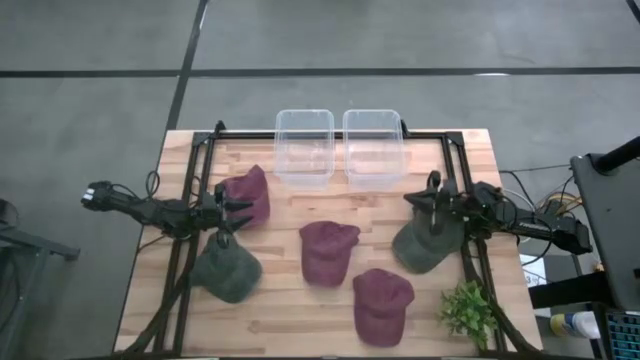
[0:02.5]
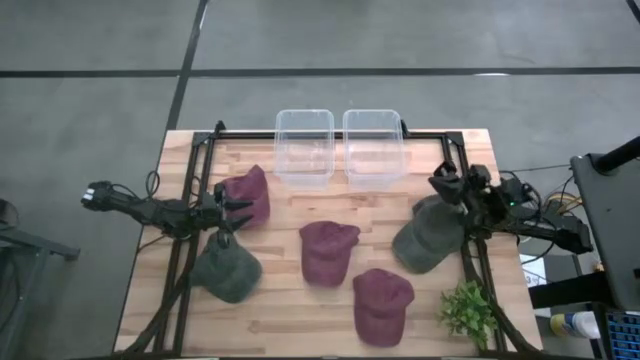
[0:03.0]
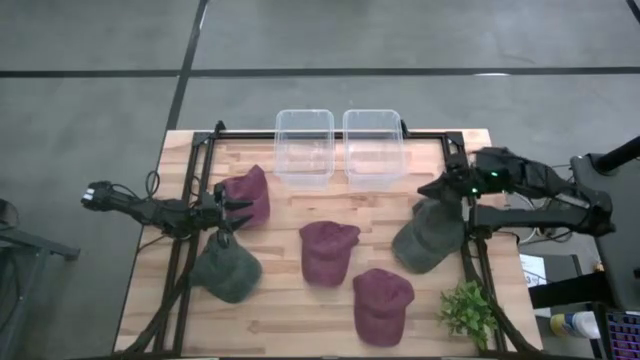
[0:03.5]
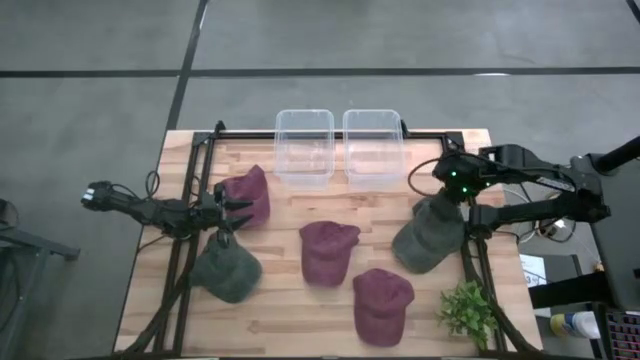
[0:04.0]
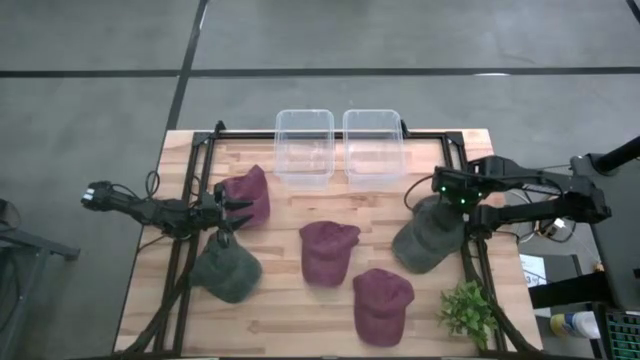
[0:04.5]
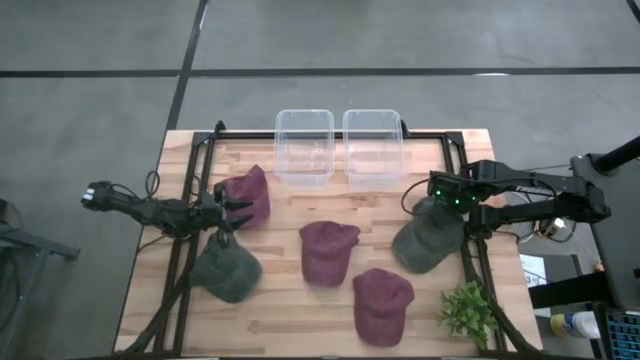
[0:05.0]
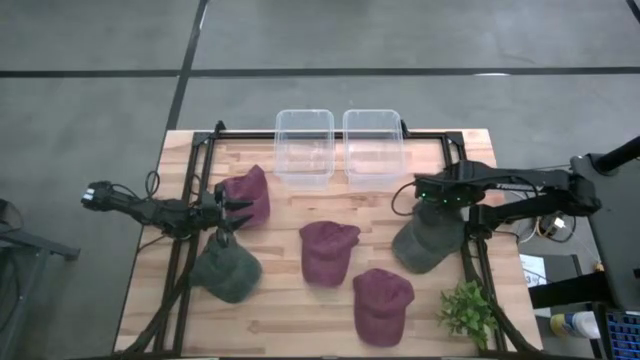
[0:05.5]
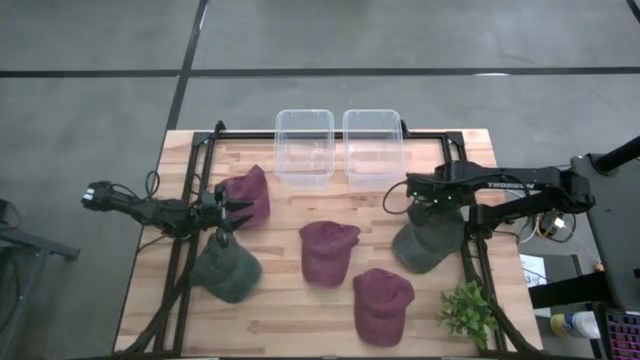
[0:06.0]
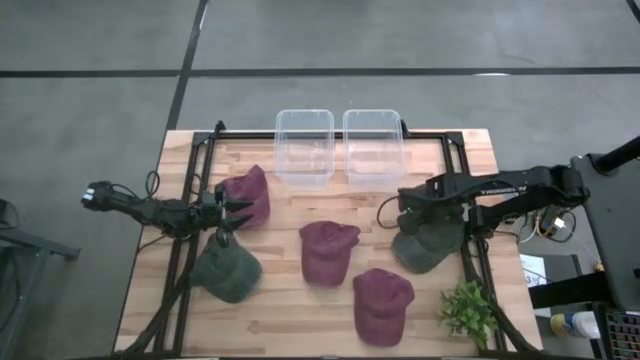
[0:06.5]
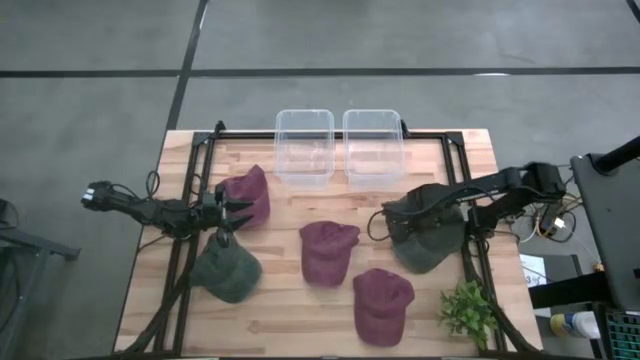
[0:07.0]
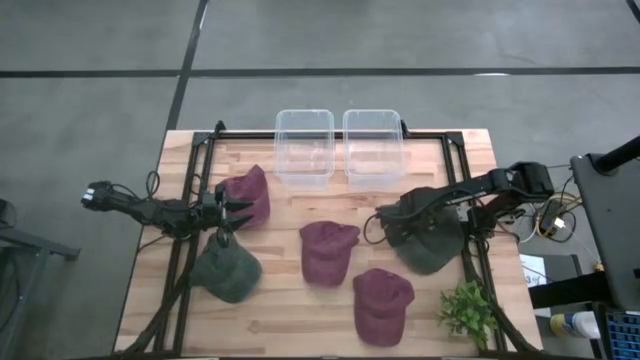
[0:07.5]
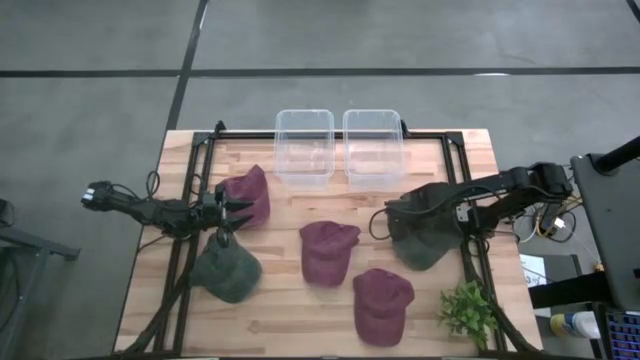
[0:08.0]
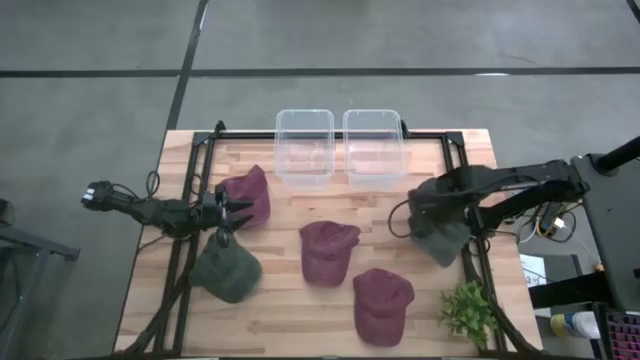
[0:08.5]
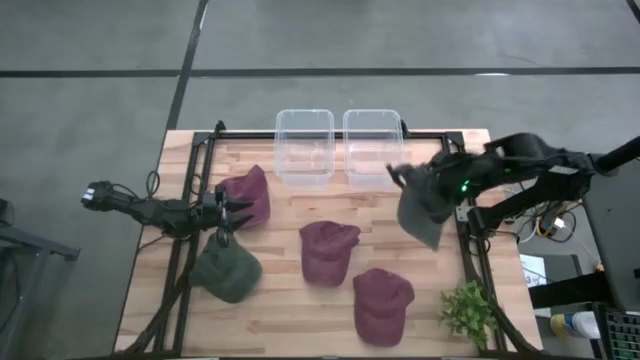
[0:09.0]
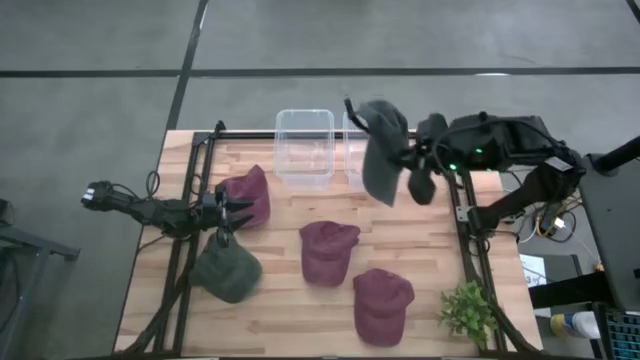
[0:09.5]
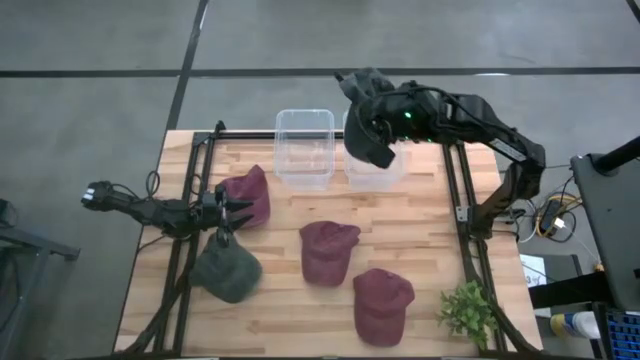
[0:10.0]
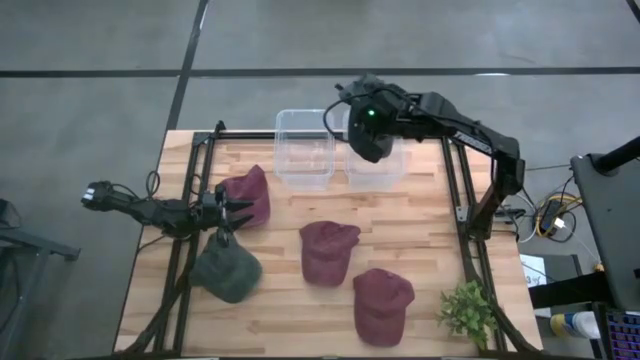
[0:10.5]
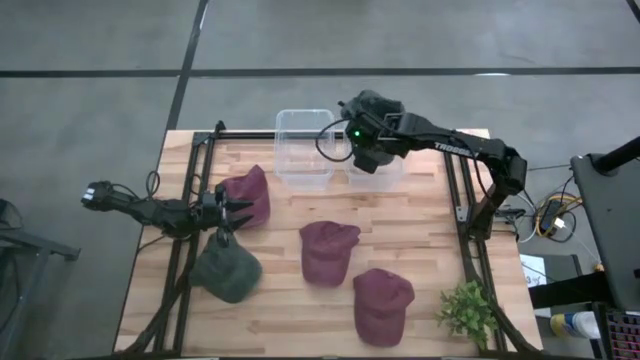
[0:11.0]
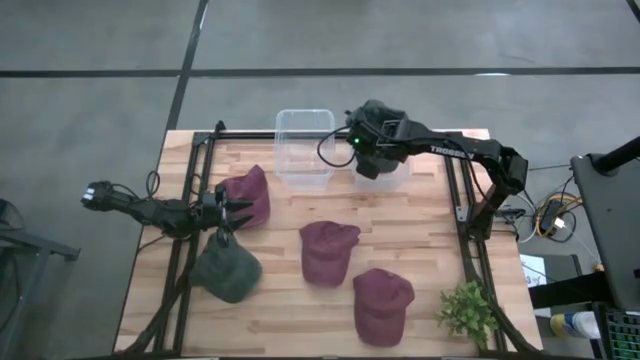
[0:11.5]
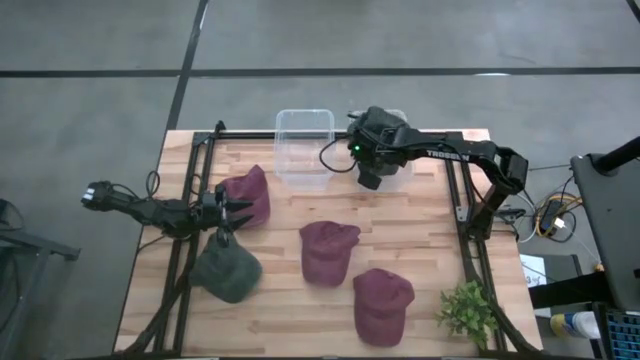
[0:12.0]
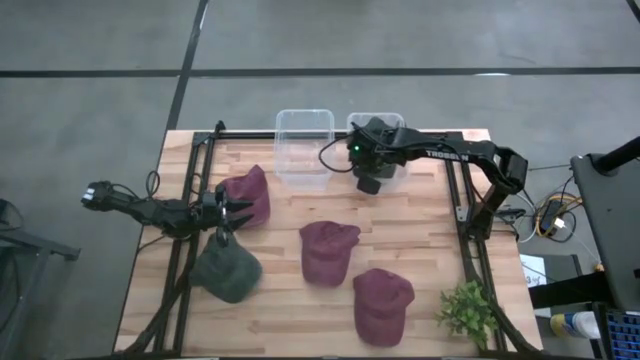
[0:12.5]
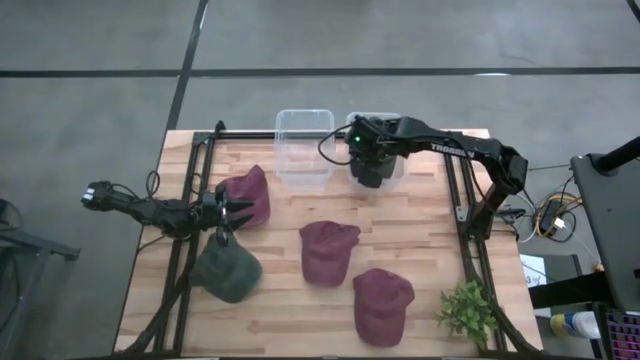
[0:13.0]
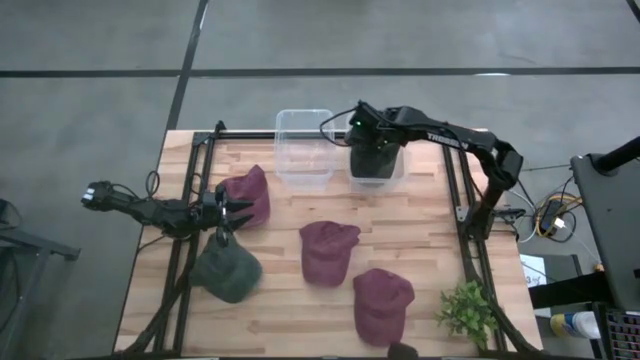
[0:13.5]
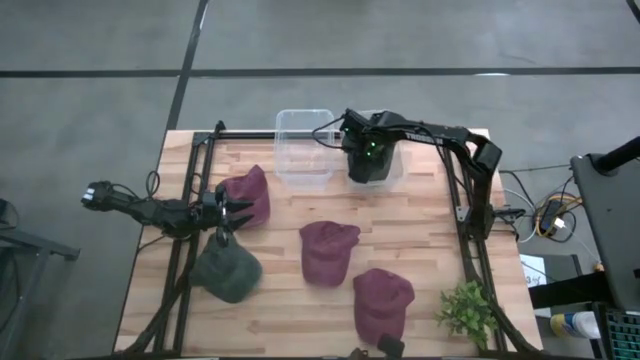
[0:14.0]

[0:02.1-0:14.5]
Task: Pick & Place hat
Put the right black cap into the right transparent bin

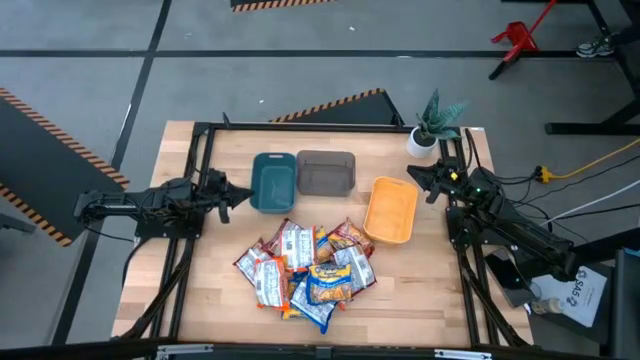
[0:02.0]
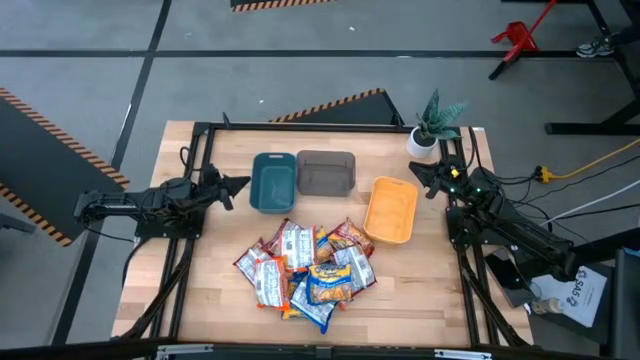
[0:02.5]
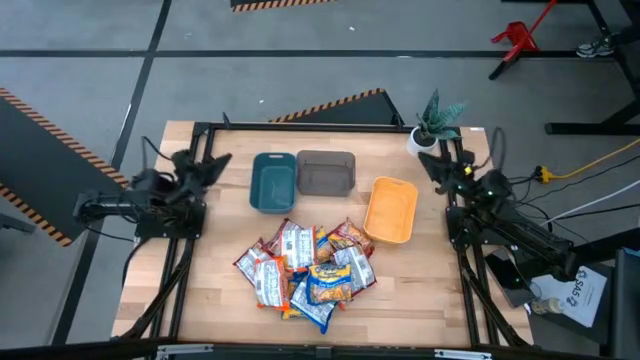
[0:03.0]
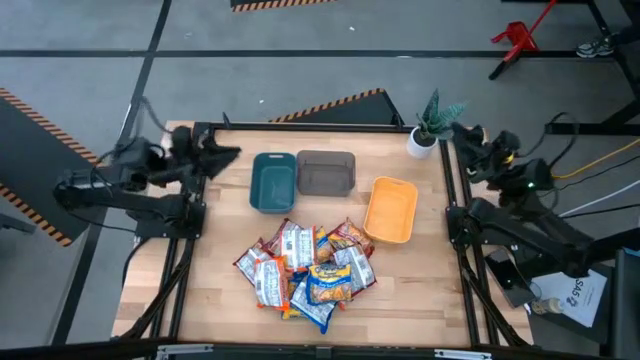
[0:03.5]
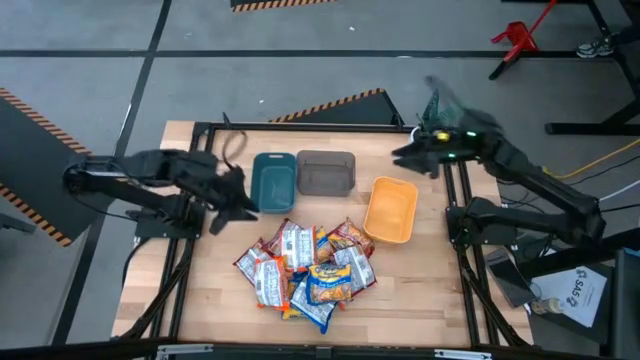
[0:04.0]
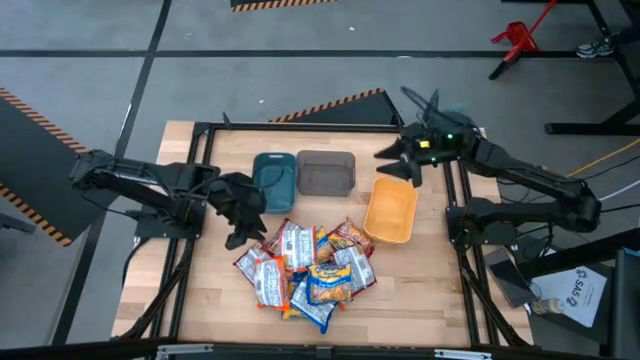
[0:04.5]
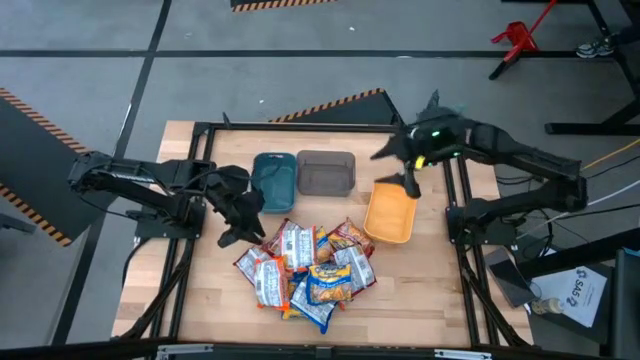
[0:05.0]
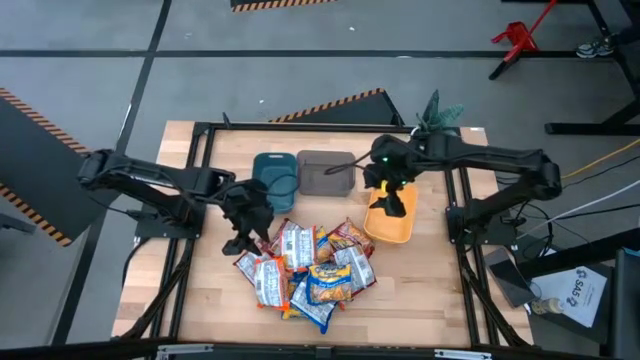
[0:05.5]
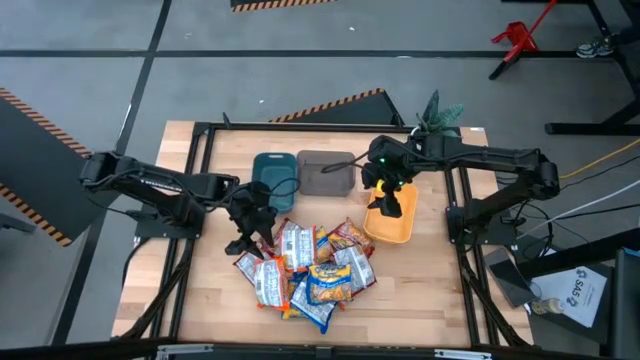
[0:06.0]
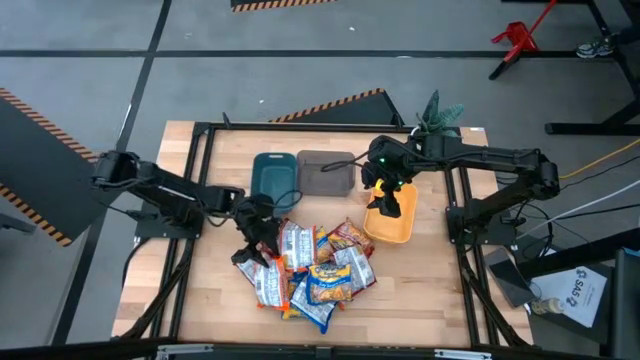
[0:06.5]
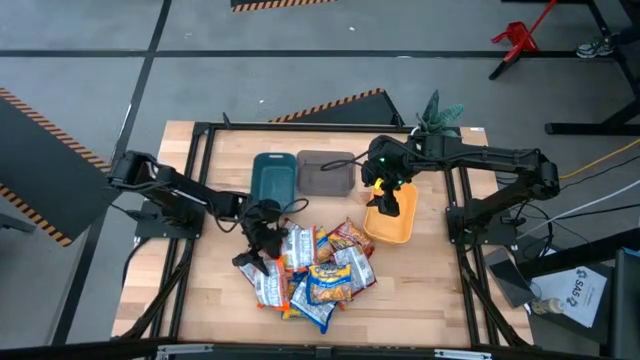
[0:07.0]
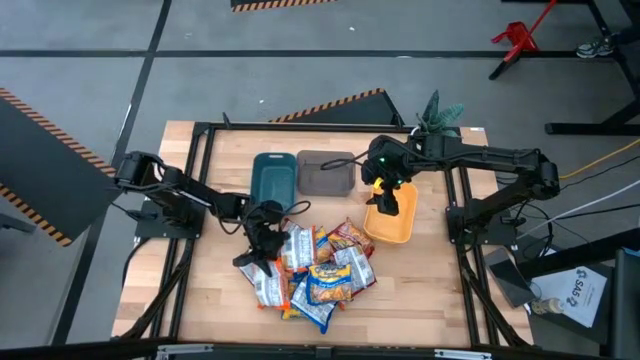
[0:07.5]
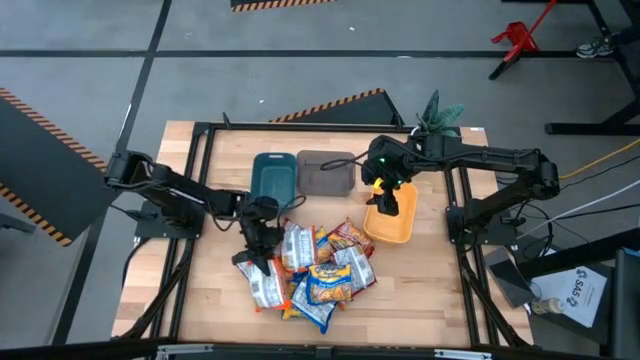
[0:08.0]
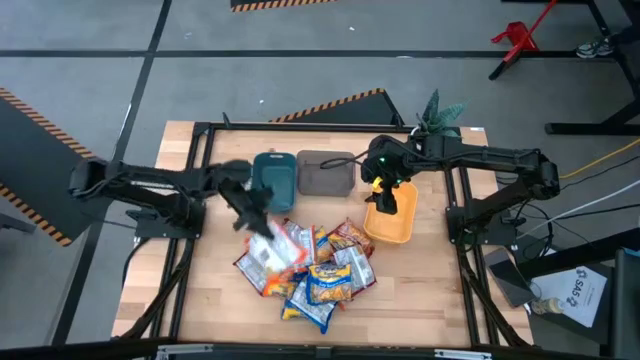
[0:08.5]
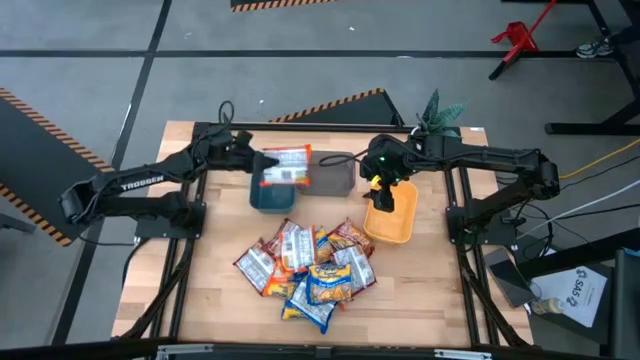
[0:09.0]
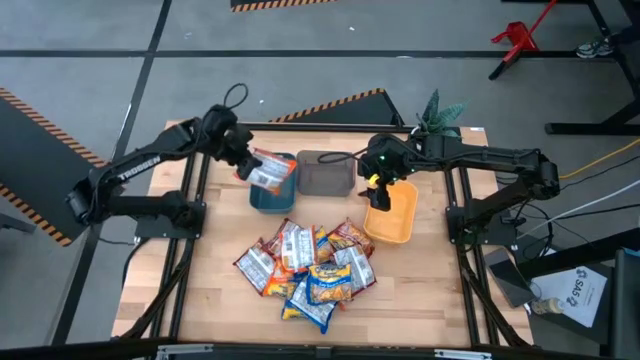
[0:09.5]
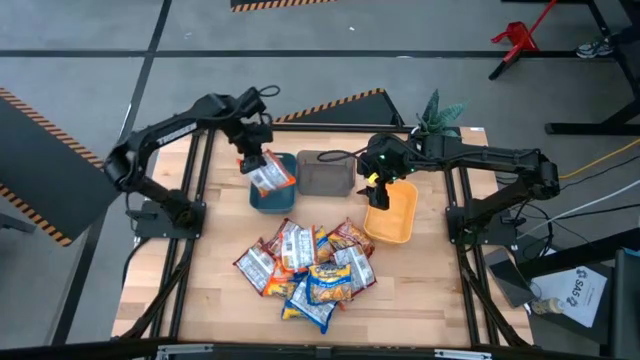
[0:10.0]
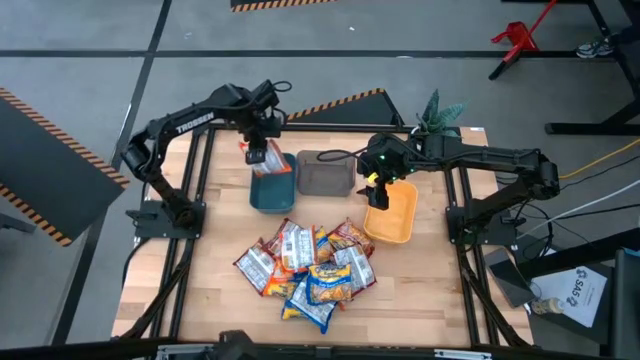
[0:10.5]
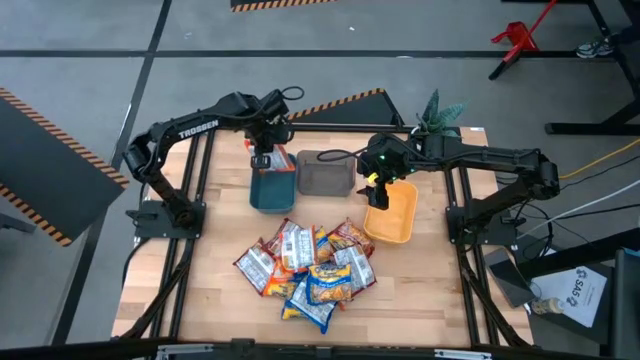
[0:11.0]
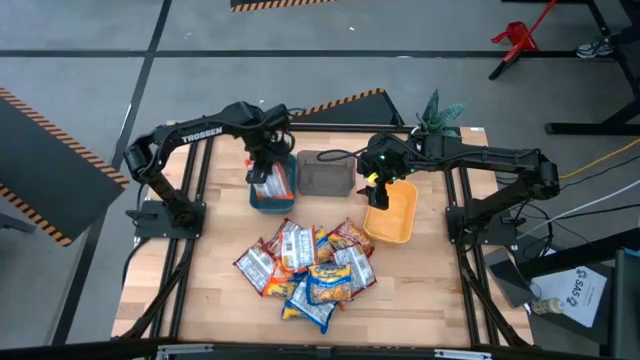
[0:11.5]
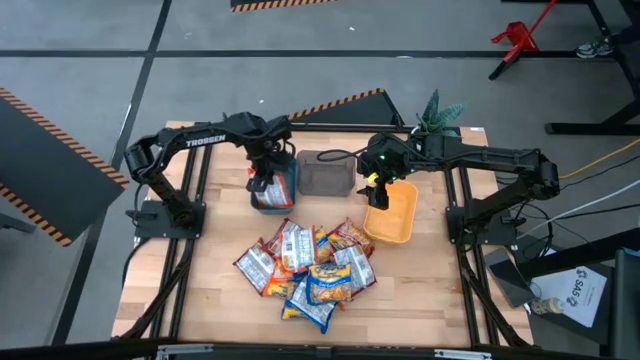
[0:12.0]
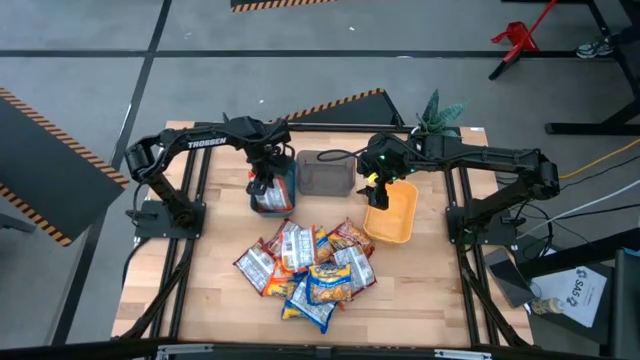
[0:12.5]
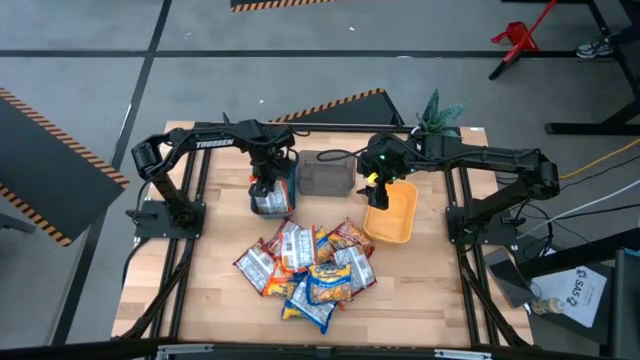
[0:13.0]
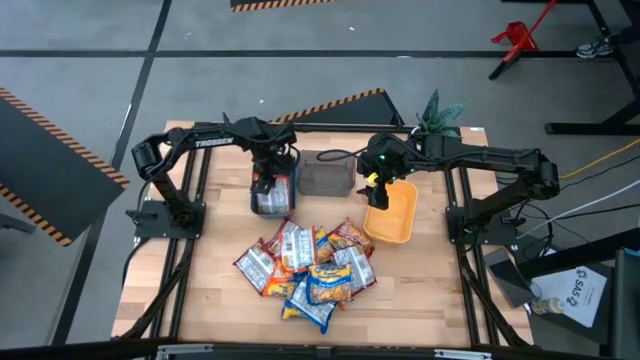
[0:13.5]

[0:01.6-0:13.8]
Task: Sort Maruchan noodles
Put the orange noodle pack into the blue bin
